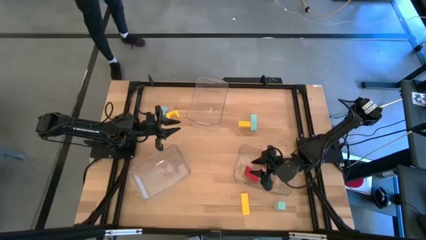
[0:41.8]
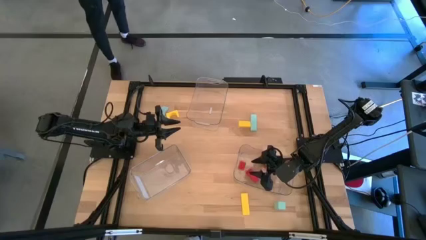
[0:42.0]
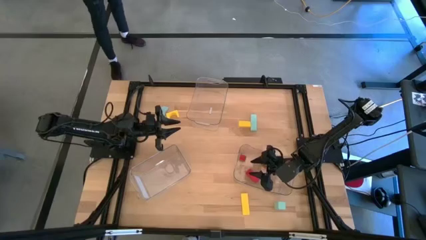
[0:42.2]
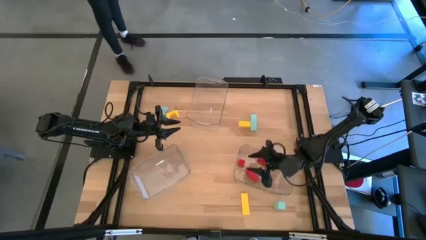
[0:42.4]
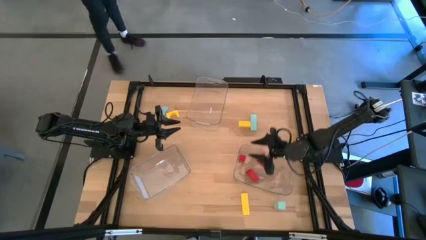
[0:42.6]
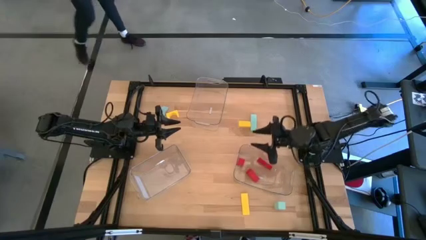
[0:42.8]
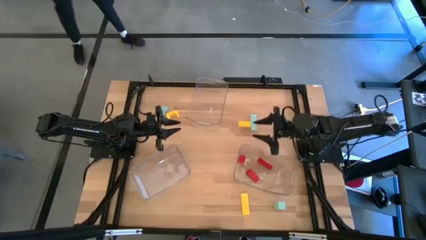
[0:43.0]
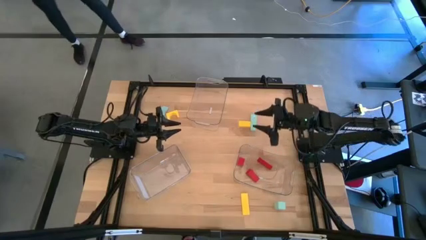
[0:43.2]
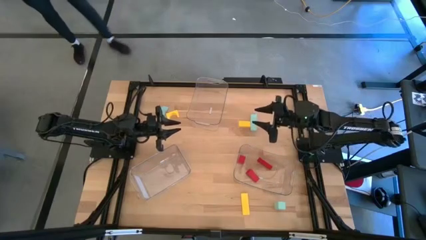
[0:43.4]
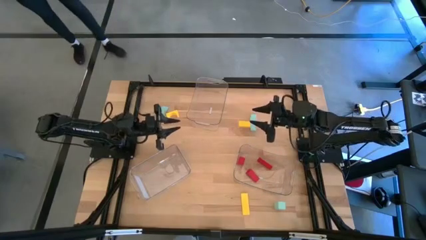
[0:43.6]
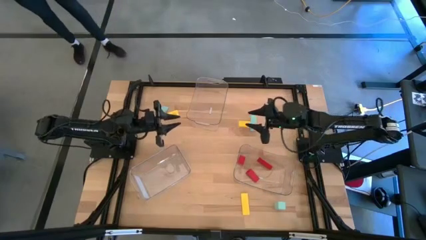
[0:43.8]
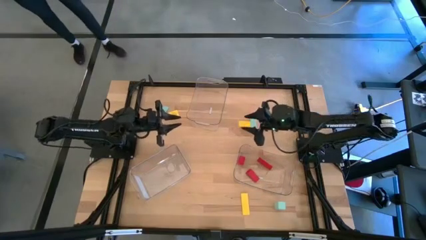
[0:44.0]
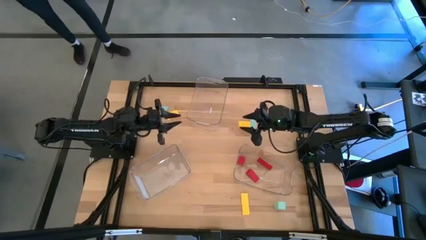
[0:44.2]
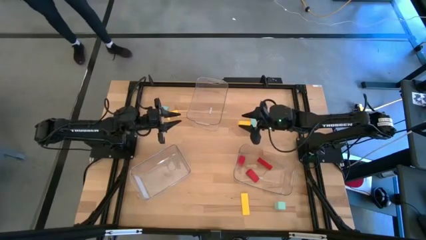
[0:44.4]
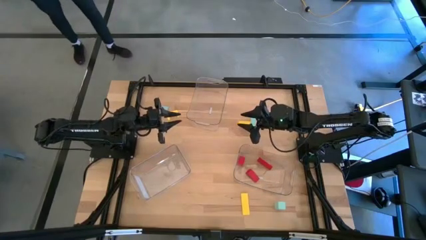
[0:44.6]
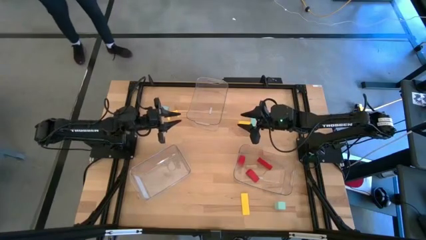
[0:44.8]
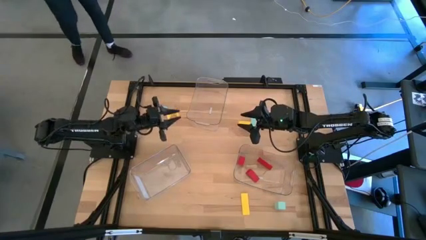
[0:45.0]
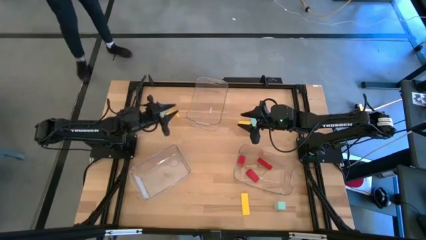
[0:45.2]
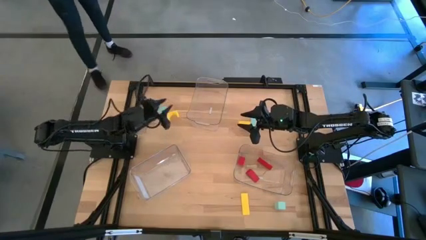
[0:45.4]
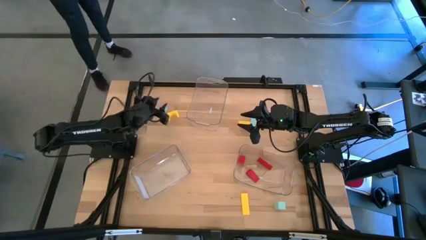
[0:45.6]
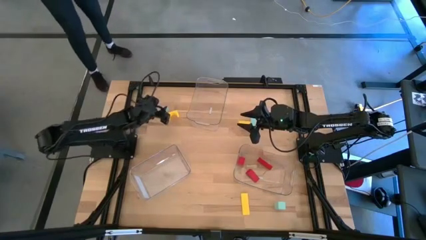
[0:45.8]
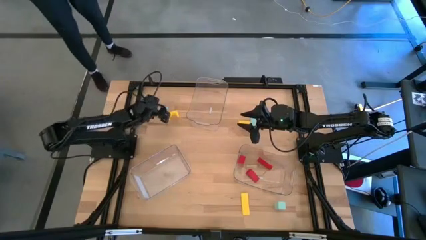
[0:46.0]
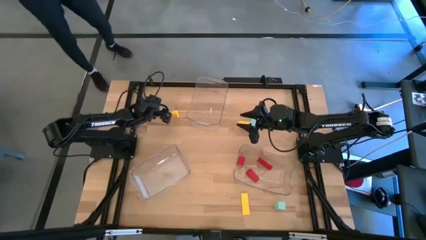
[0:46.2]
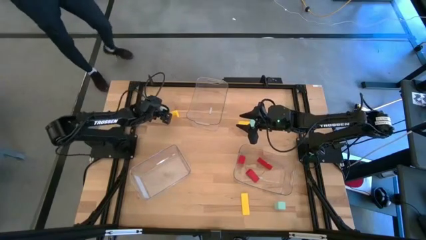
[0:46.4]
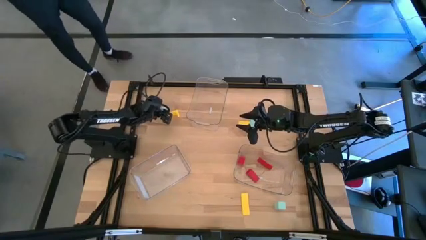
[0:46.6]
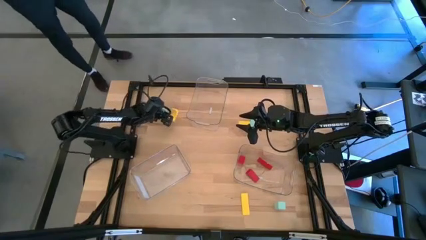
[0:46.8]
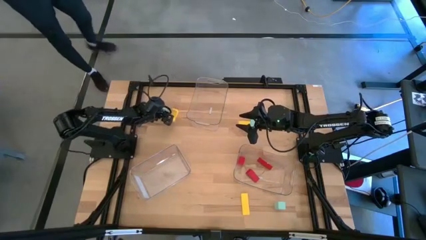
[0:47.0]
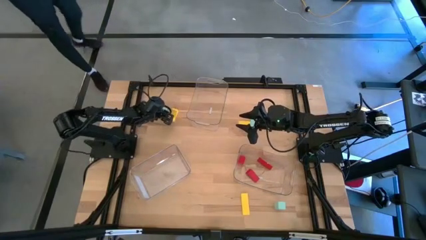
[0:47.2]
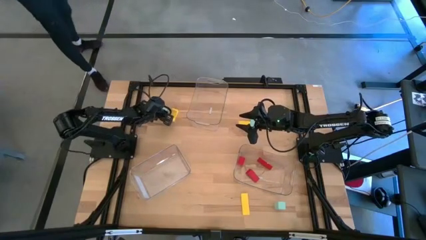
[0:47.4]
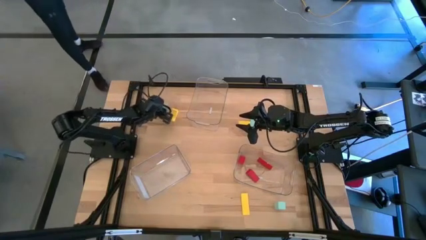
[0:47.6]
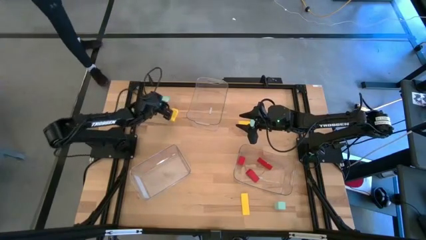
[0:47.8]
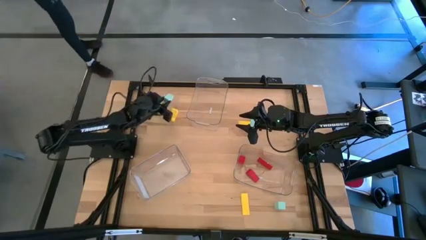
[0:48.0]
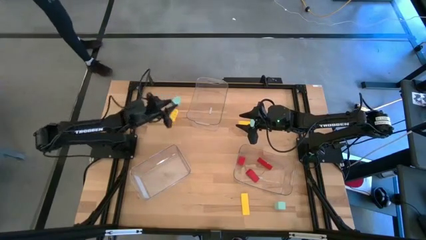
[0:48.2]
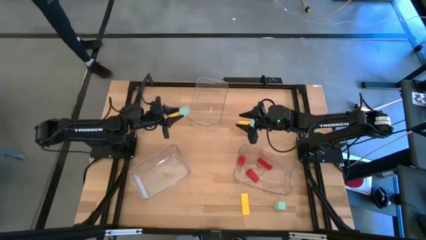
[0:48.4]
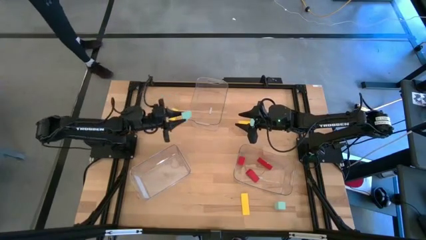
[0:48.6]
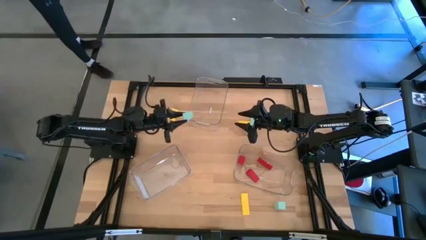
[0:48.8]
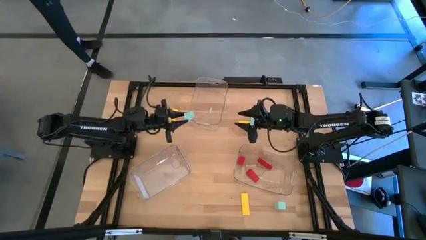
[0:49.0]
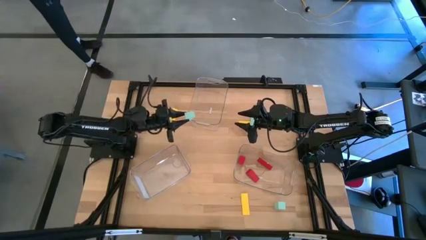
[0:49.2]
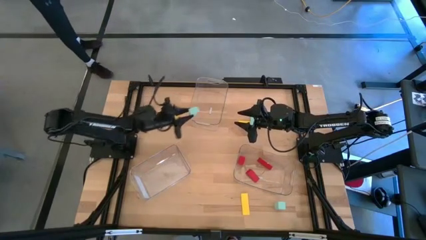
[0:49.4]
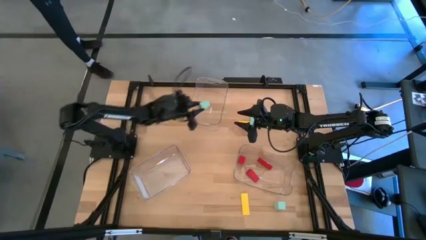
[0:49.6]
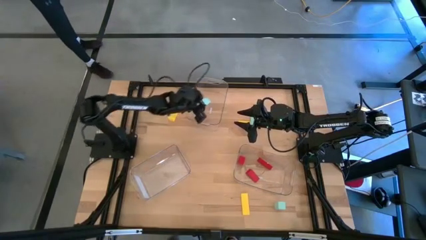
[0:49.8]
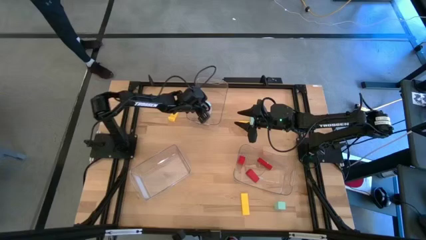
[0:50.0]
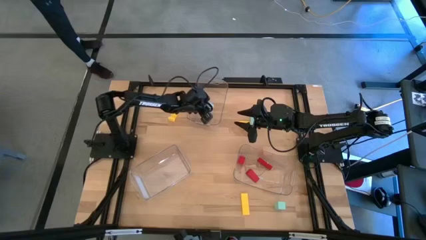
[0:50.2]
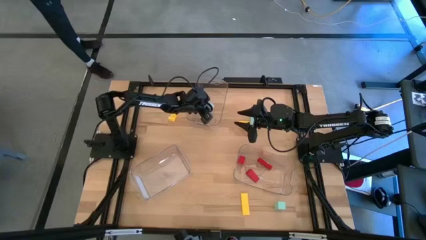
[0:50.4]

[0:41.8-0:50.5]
Task: Sort & place blocks by color
Put the top left blue into the top transparent bin

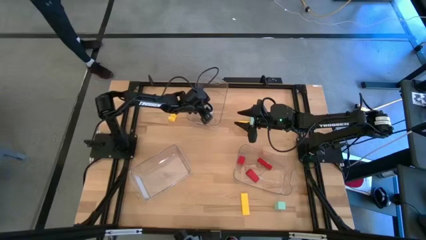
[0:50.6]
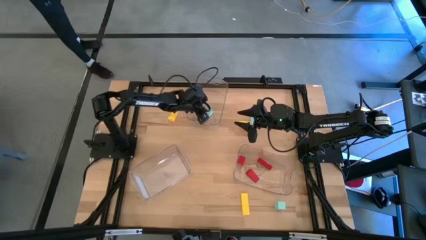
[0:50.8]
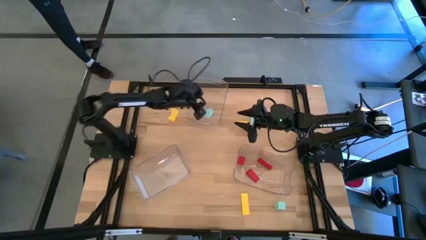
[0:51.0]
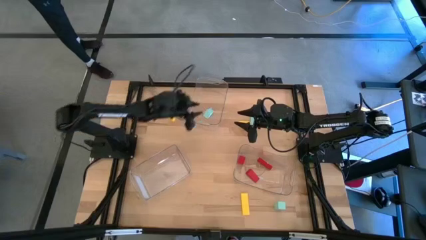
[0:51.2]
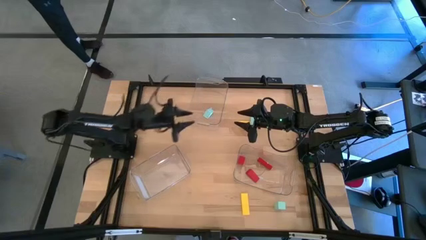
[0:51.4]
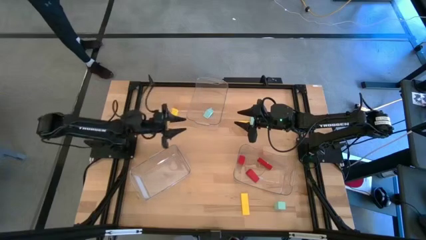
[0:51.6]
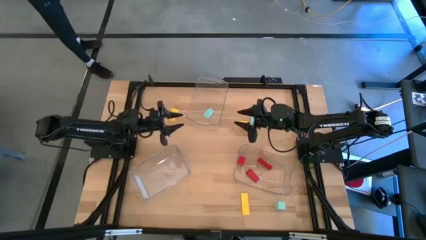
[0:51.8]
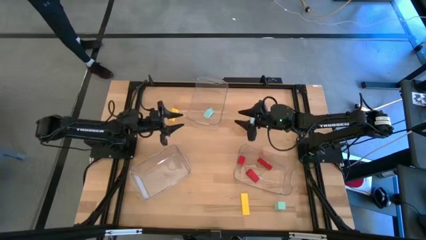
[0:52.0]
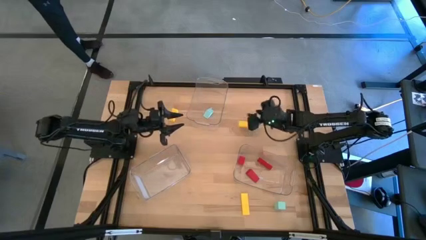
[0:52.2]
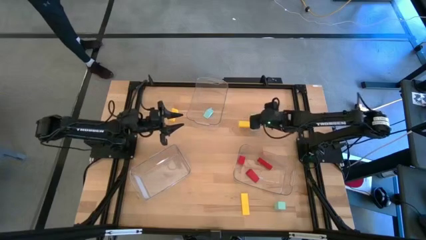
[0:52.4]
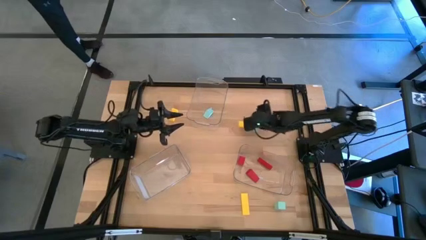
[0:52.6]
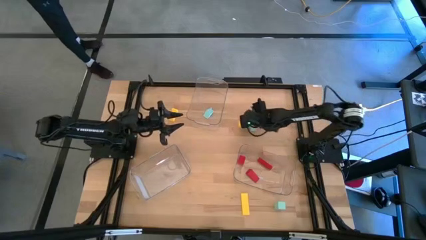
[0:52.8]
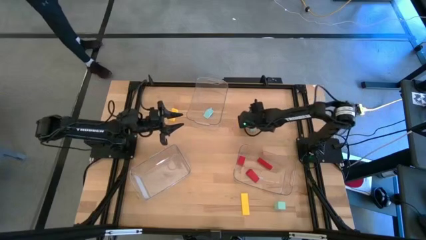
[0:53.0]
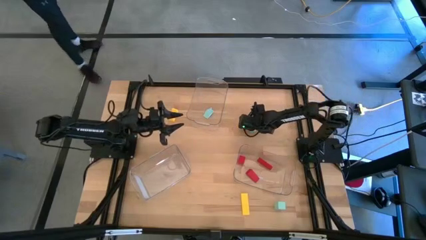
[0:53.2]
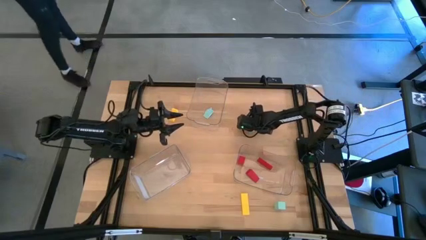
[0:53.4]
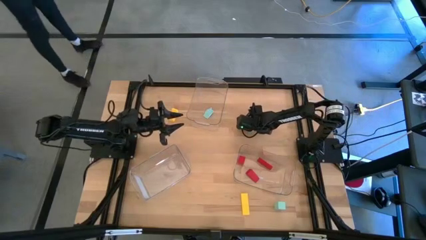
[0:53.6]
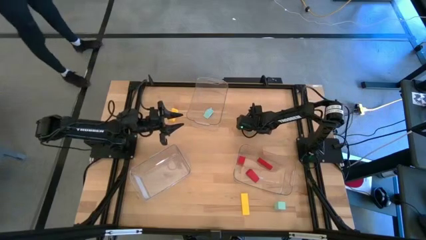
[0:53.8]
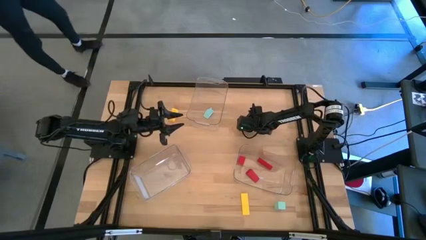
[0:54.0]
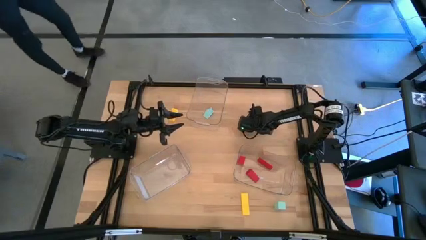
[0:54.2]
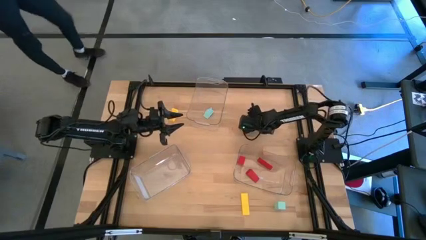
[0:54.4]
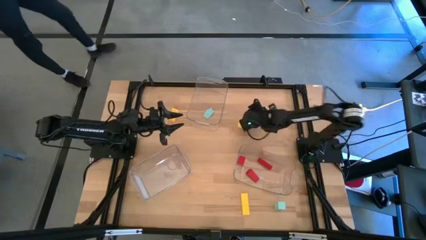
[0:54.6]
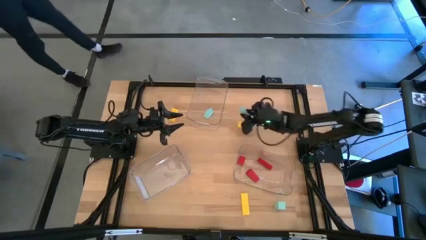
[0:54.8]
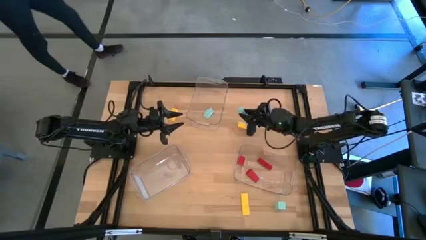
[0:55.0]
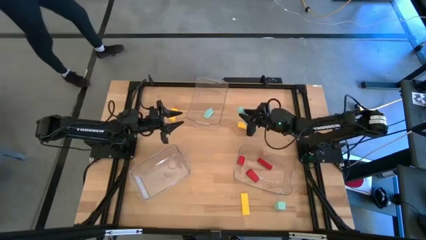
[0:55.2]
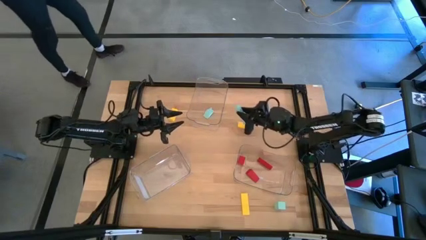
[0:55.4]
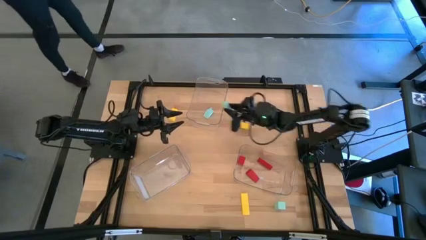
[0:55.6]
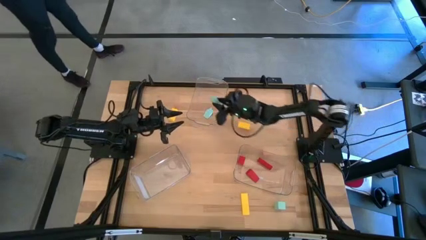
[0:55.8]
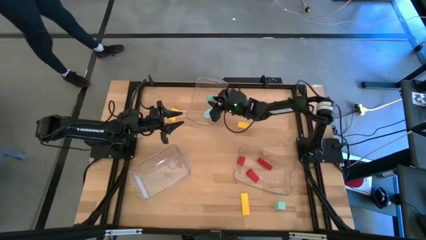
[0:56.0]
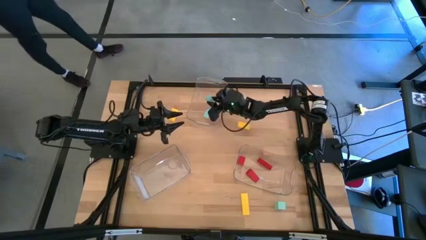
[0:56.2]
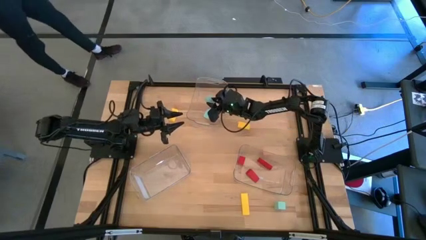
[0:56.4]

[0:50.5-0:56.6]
Put the top blue block into the top transparent bin
